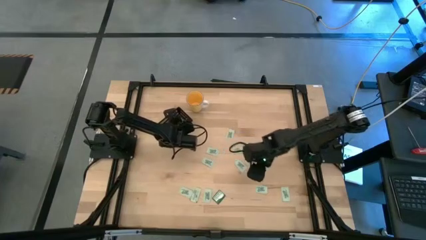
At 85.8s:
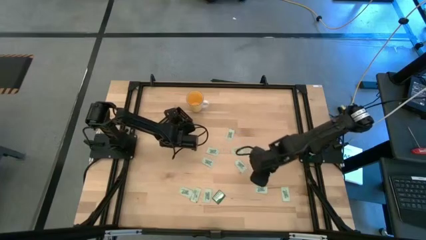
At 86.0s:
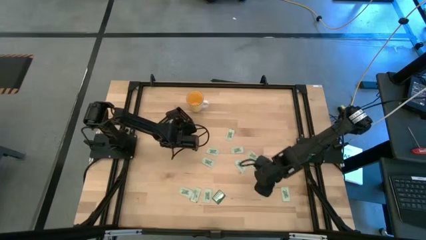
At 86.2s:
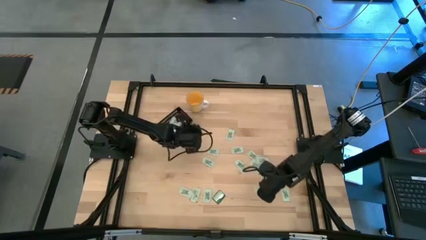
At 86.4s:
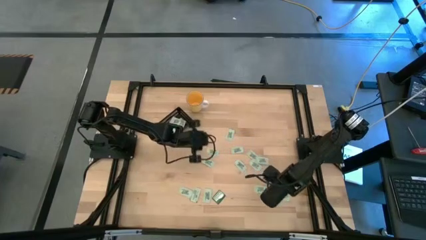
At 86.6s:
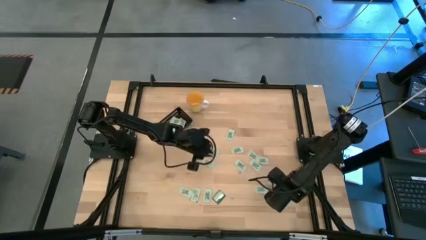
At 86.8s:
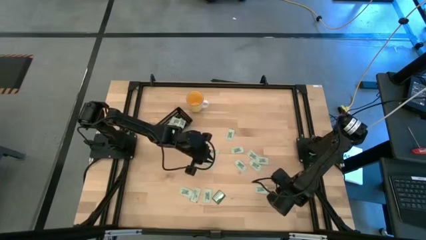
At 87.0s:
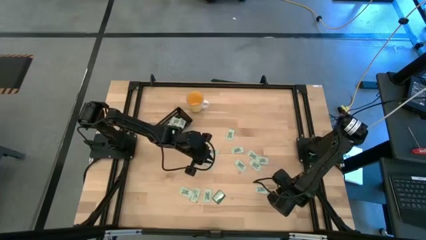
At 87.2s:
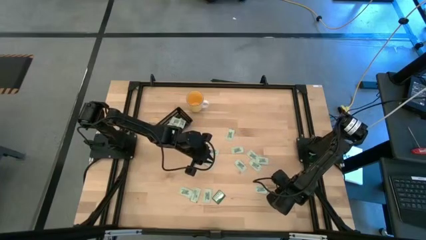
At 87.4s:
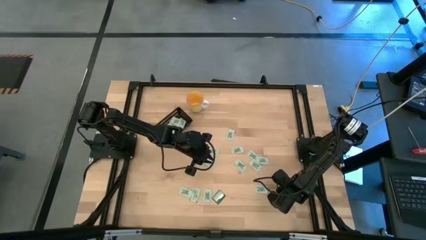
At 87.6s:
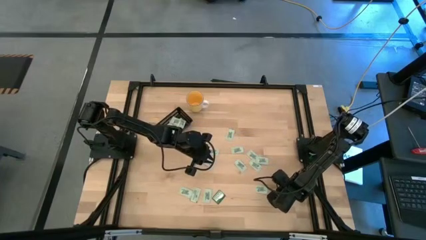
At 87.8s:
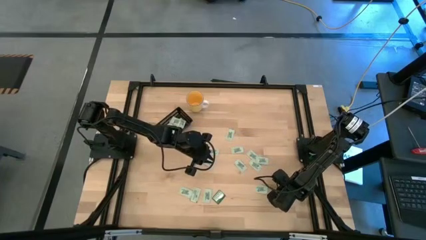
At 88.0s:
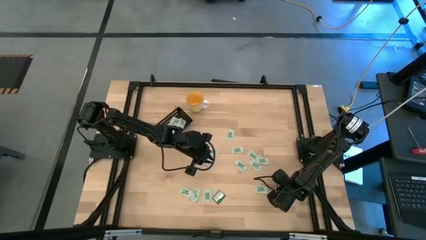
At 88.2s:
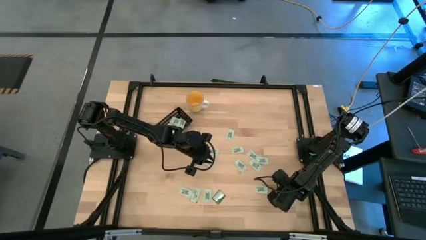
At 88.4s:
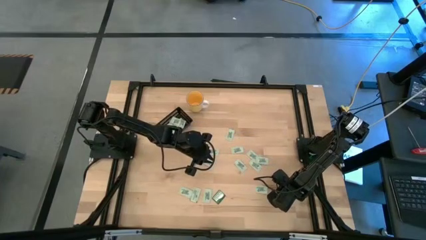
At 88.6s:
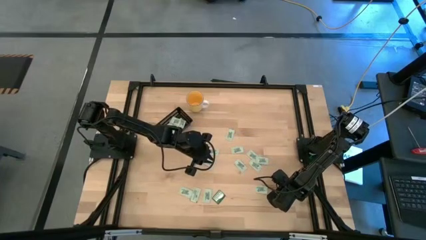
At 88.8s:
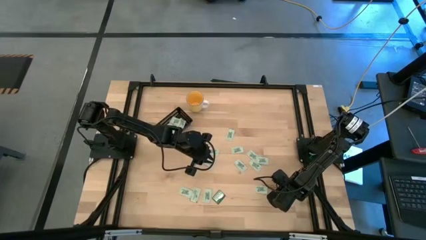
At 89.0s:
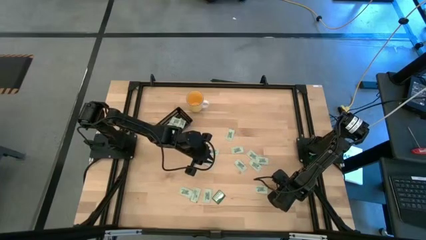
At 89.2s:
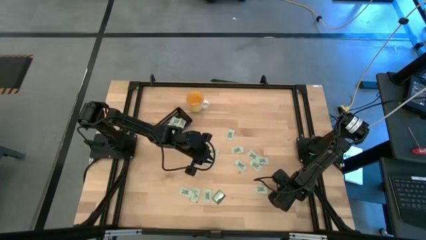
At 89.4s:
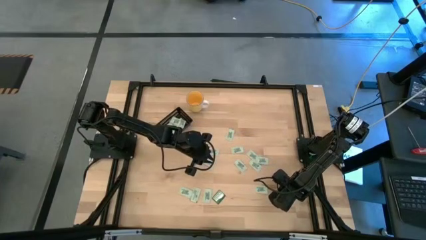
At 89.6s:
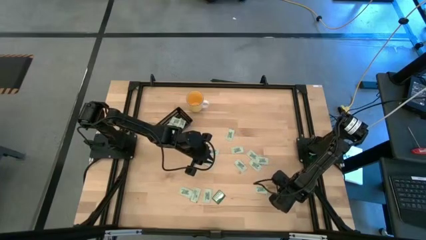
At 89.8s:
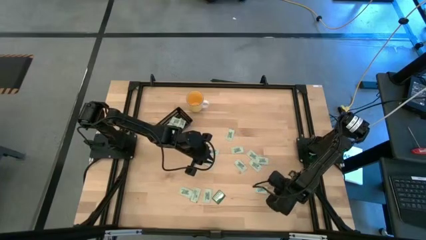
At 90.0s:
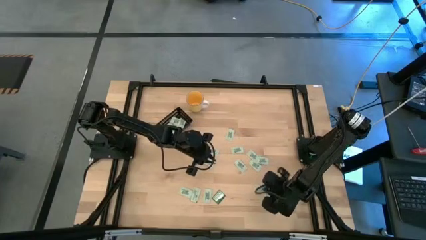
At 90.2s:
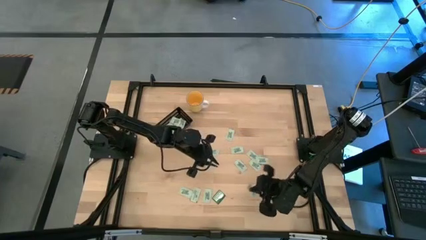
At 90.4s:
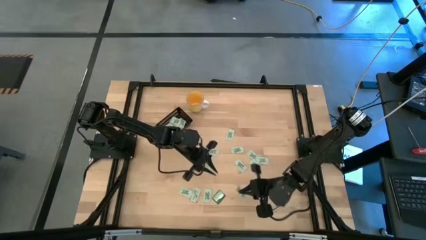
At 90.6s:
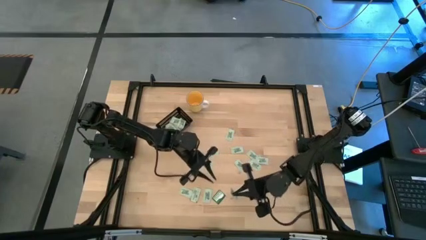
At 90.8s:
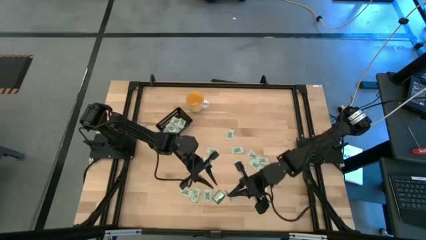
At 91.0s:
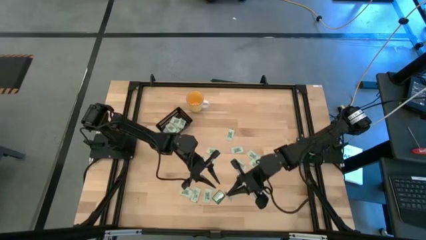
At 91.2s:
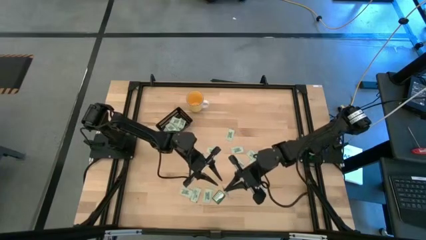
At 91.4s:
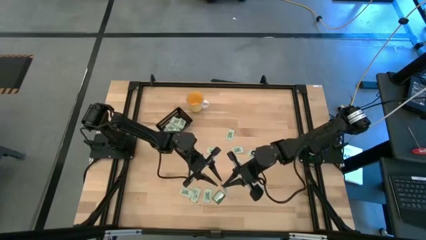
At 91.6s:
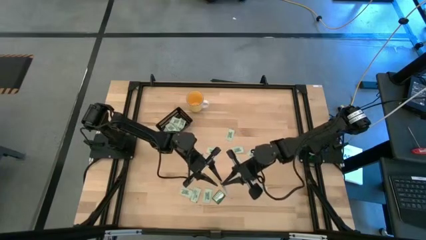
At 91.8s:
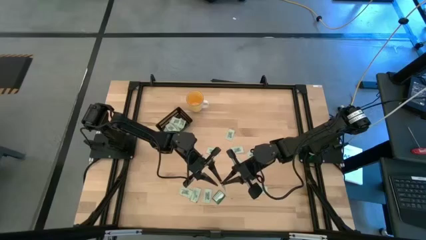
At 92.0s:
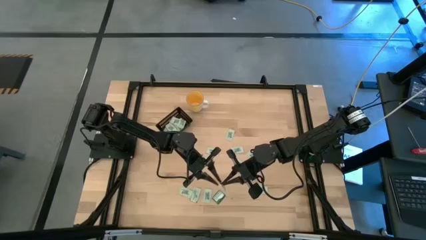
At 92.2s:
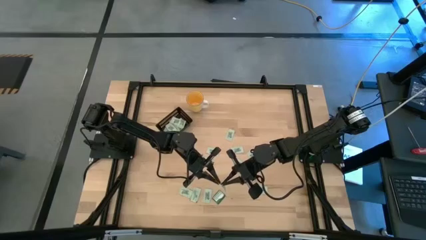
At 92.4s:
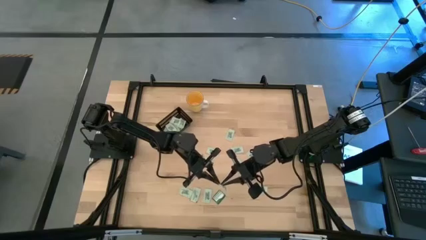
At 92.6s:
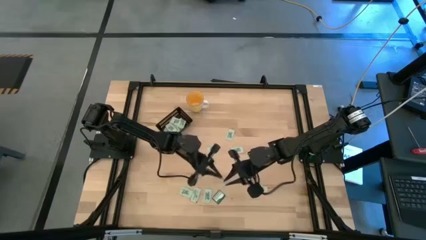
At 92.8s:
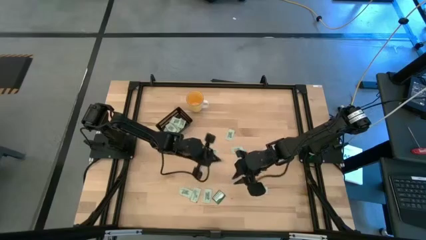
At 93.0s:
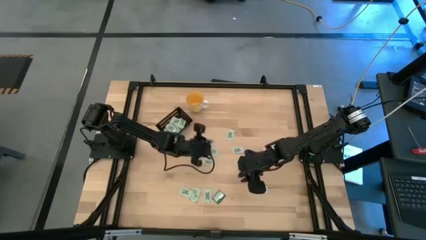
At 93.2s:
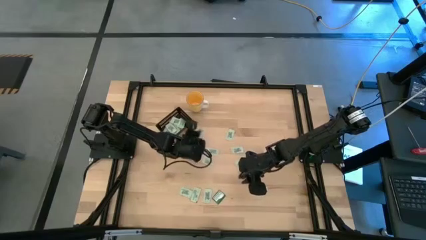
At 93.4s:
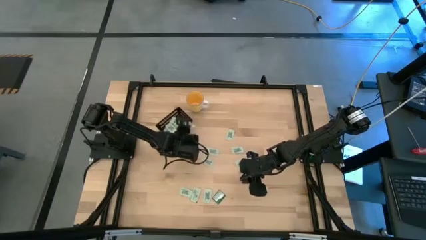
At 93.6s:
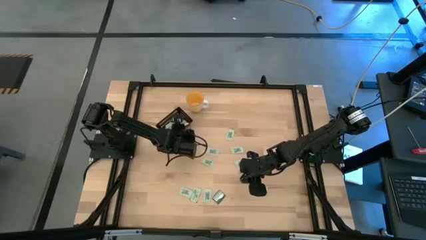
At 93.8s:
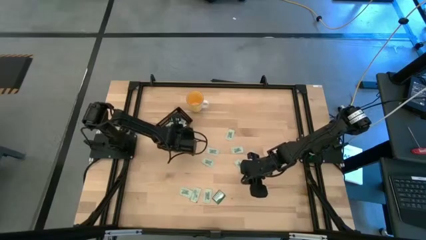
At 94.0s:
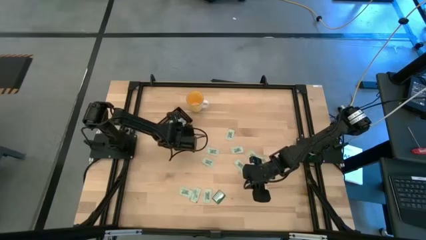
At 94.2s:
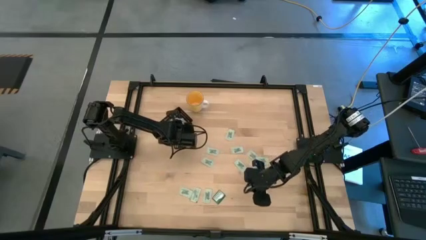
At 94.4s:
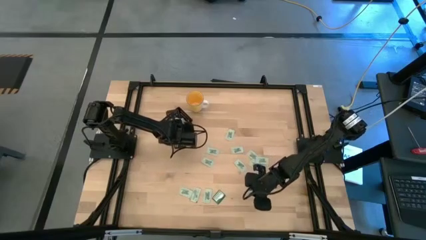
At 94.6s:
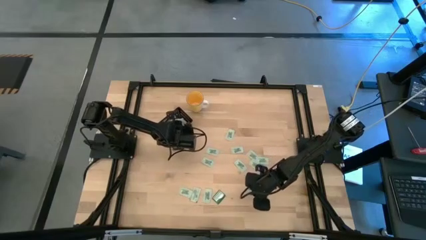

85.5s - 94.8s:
Task: Pick and place Stevia / Truvia into bins
Put the green stevia packet into the black bin

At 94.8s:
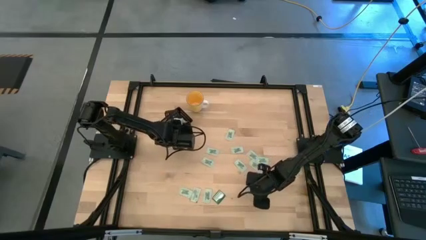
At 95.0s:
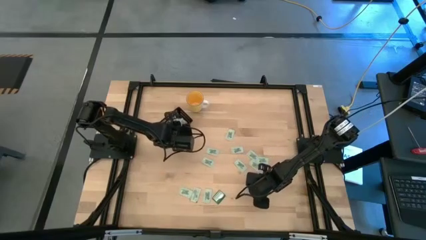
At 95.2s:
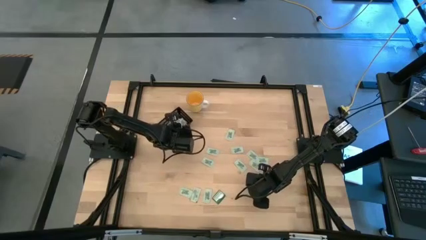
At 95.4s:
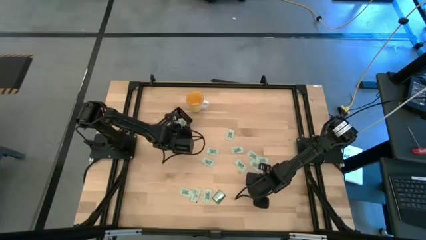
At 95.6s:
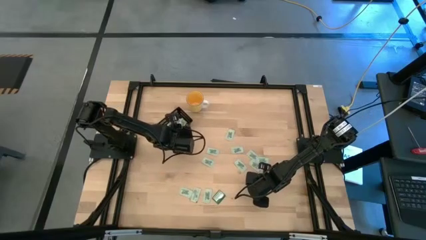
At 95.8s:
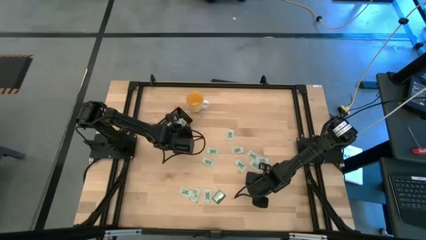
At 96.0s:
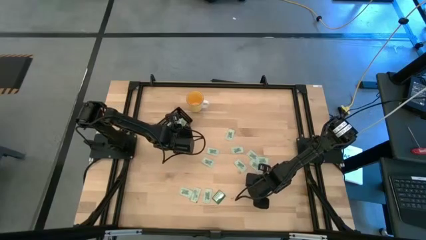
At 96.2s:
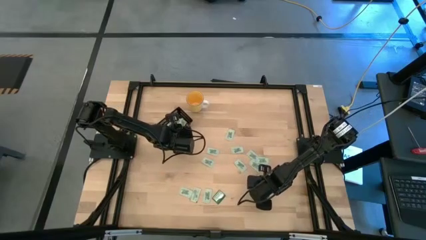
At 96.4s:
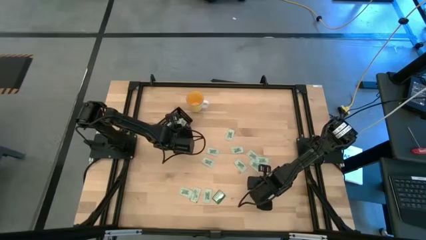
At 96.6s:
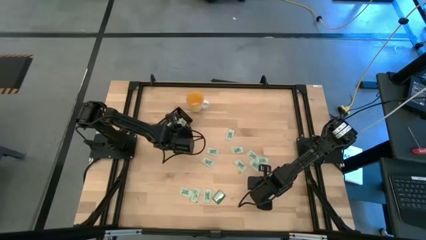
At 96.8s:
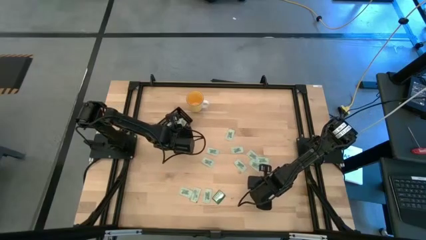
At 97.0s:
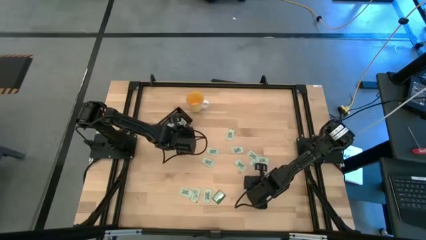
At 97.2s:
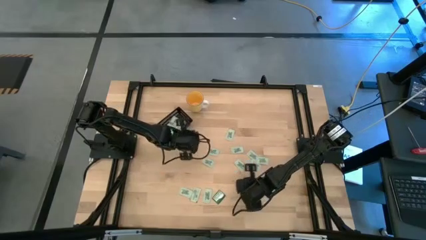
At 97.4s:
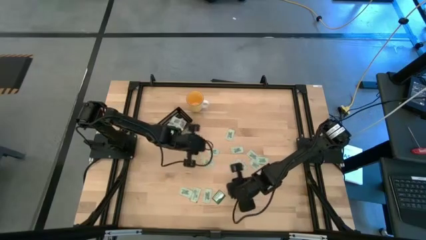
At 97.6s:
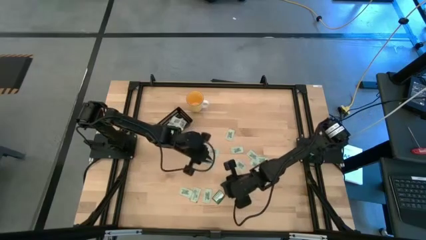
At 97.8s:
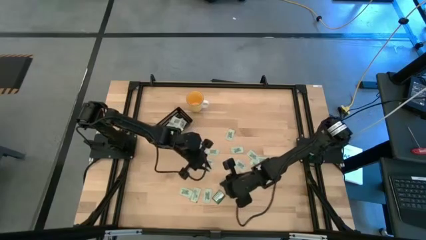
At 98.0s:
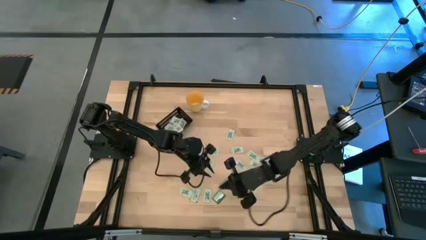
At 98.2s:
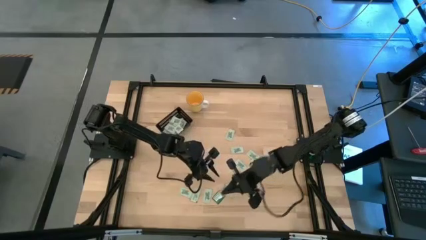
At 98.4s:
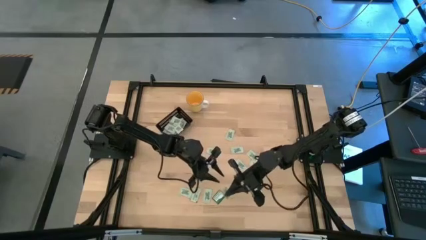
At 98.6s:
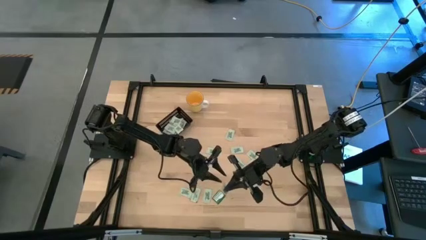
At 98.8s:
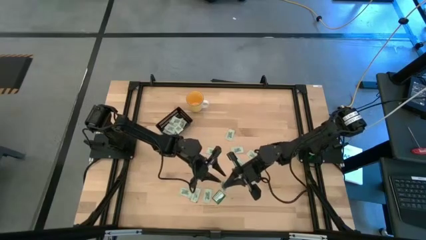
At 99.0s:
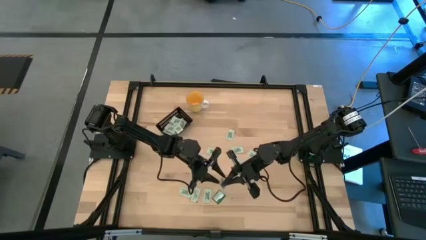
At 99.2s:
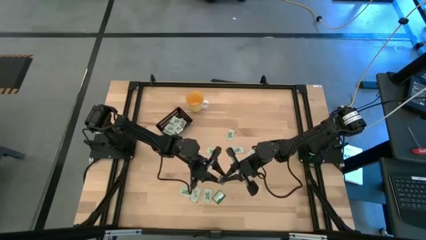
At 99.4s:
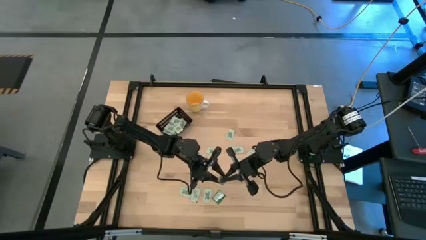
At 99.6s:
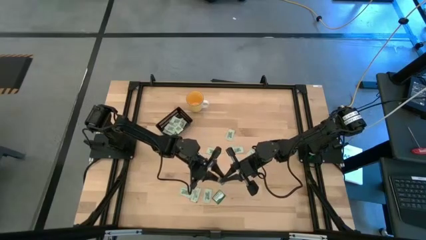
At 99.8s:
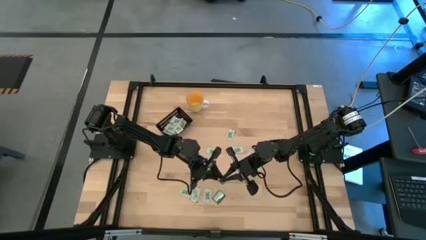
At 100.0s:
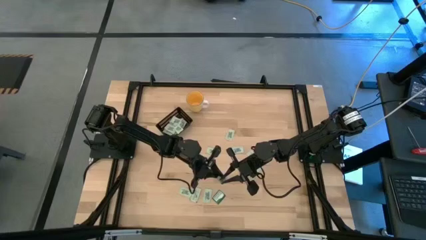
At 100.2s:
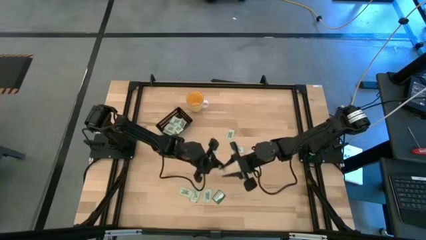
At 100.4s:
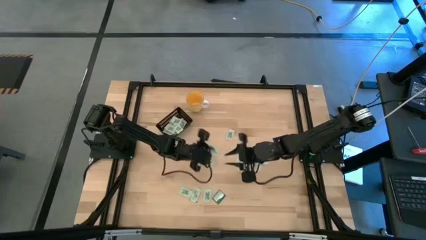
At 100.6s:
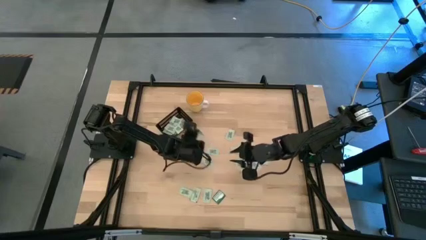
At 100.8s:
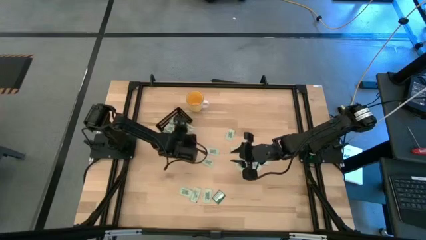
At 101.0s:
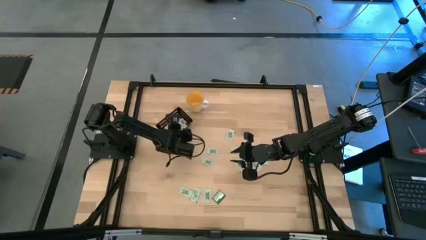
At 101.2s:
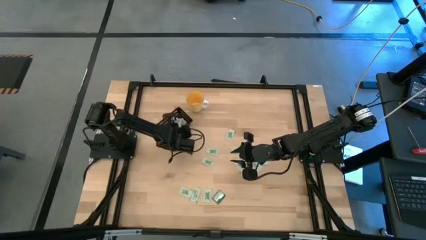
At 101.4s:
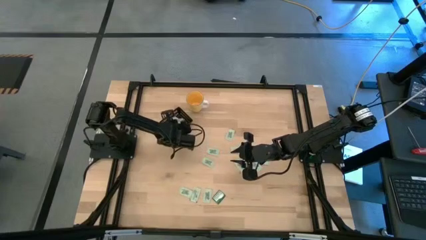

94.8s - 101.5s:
Put the green stevia packet into the black bin

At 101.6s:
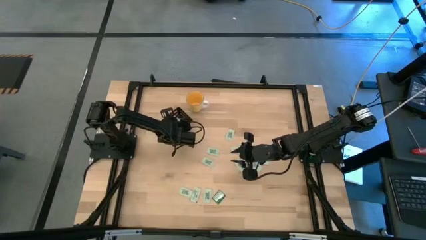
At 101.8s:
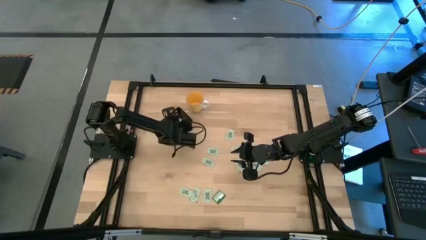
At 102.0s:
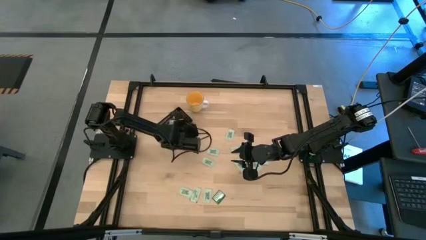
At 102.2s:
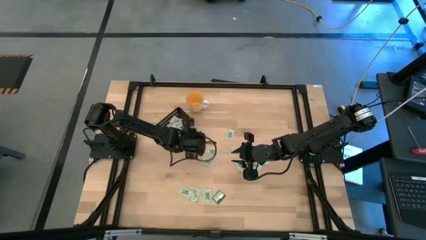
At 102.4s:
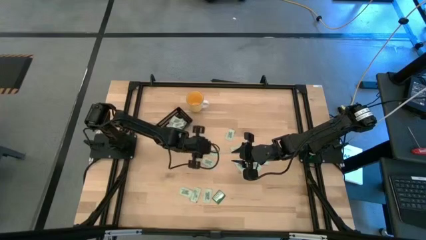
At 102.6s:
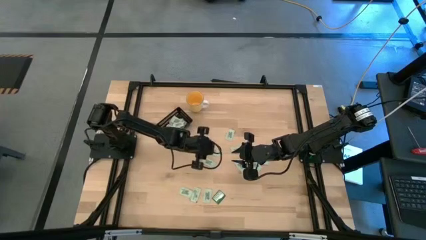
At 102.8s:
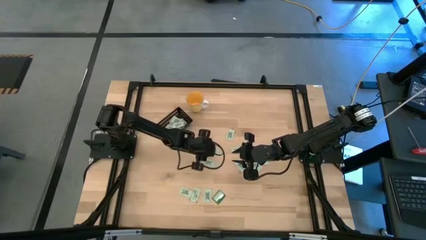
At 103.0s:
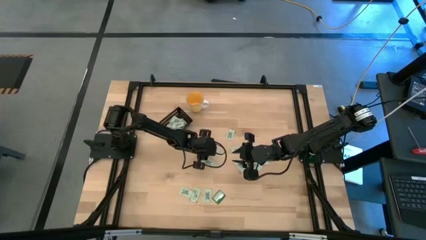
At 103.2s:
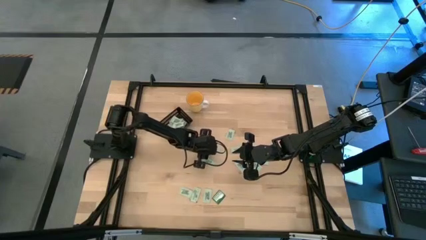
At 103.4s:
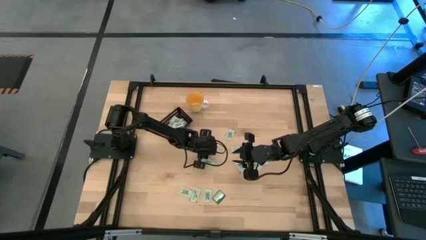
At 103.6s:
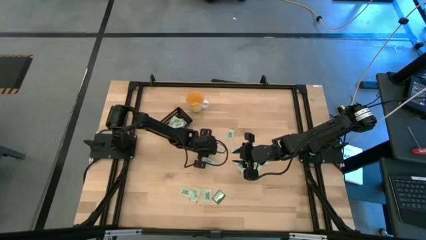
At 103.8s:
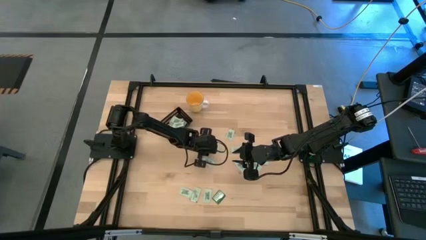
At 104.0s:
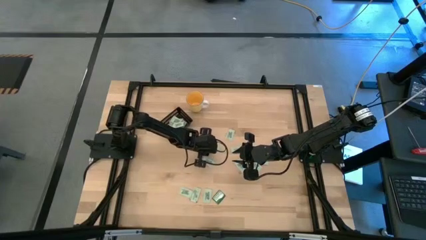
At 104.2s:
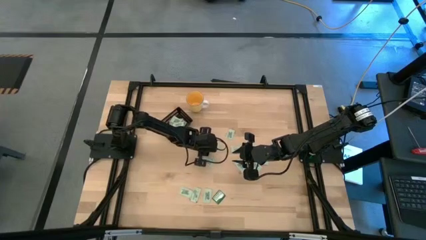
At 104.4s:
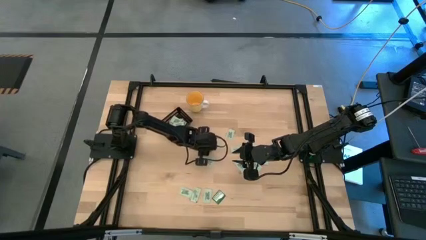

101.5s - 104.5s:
Put the green stevia packet into the black bin
